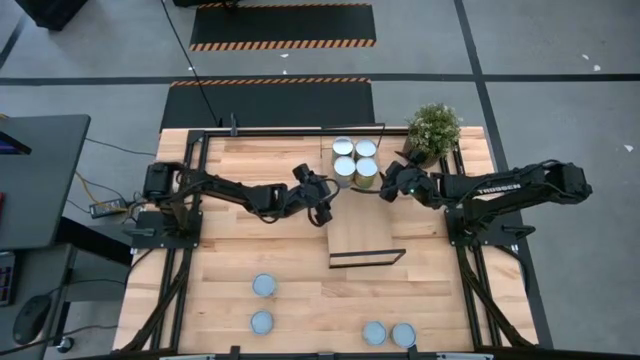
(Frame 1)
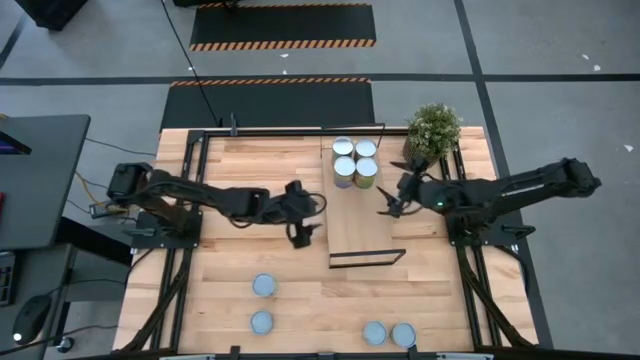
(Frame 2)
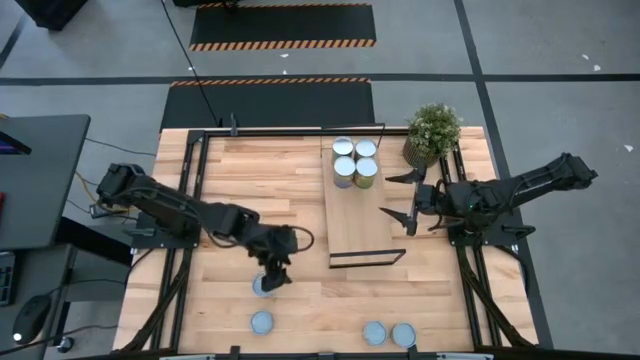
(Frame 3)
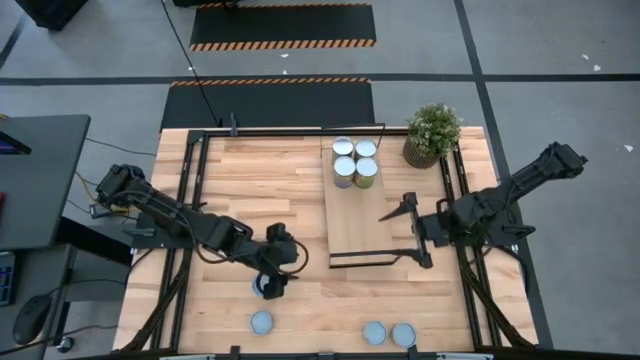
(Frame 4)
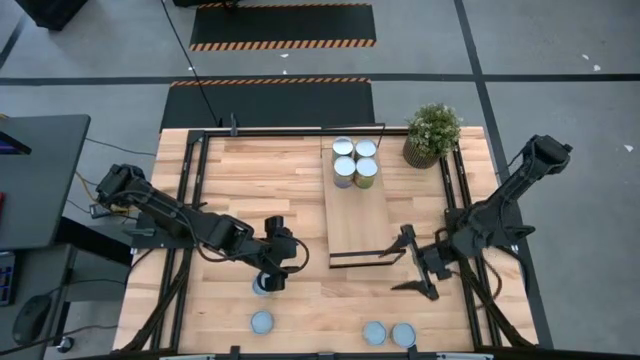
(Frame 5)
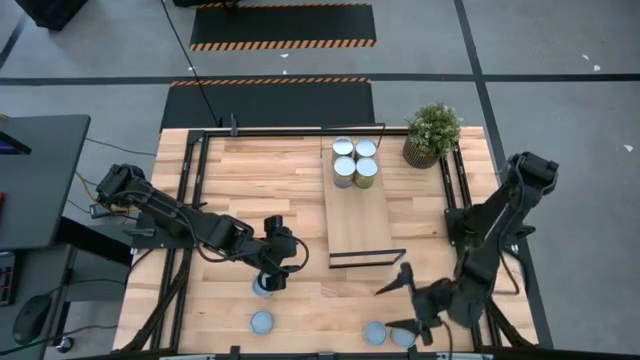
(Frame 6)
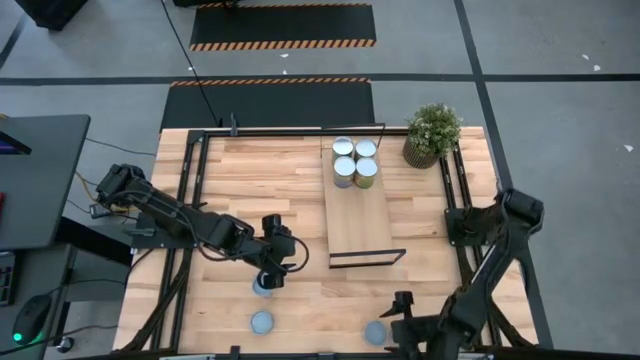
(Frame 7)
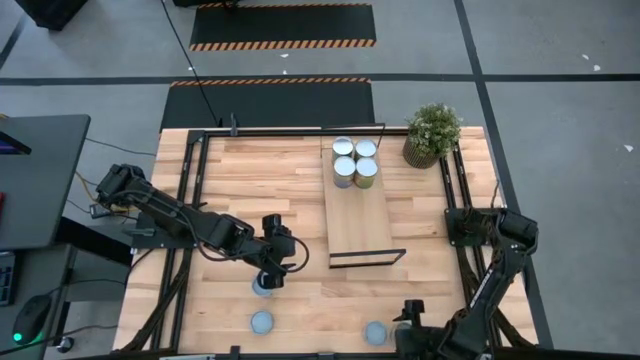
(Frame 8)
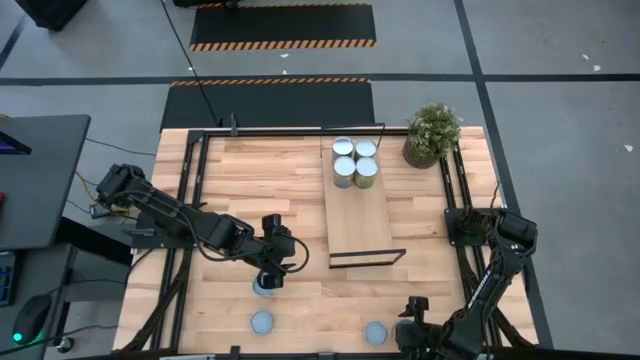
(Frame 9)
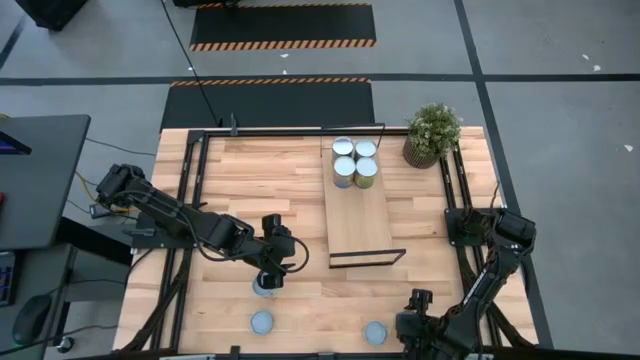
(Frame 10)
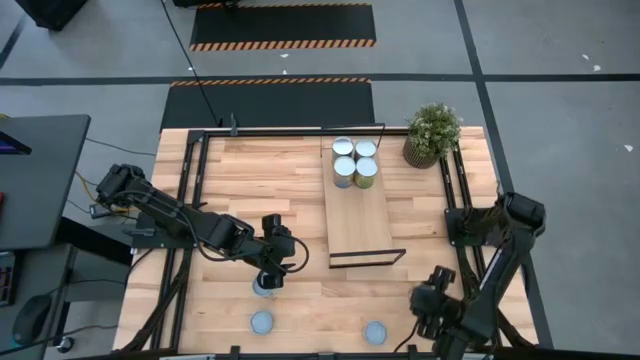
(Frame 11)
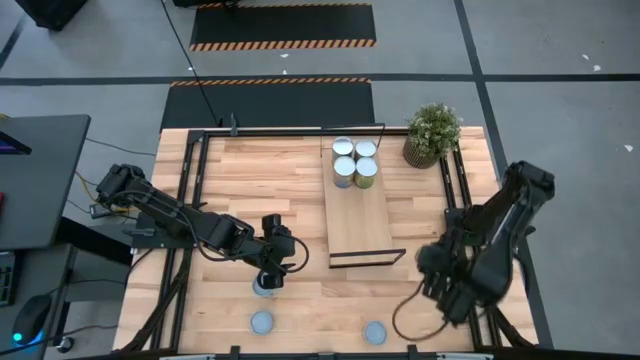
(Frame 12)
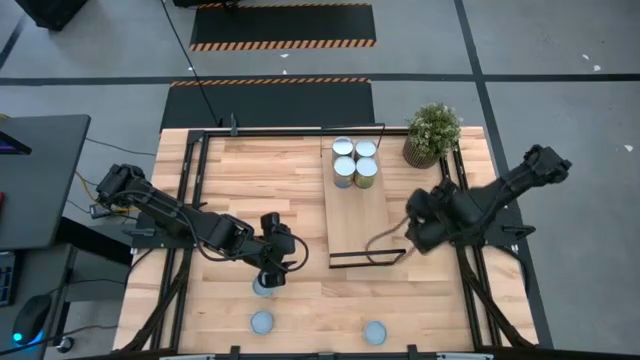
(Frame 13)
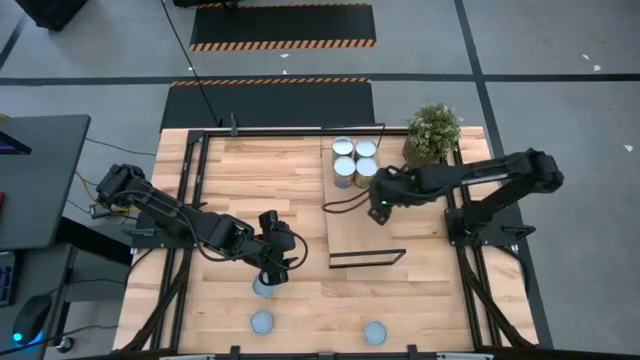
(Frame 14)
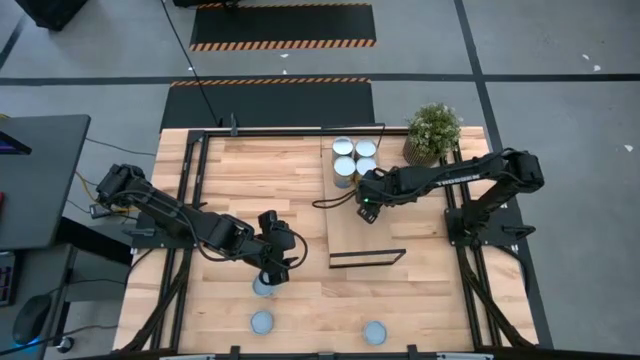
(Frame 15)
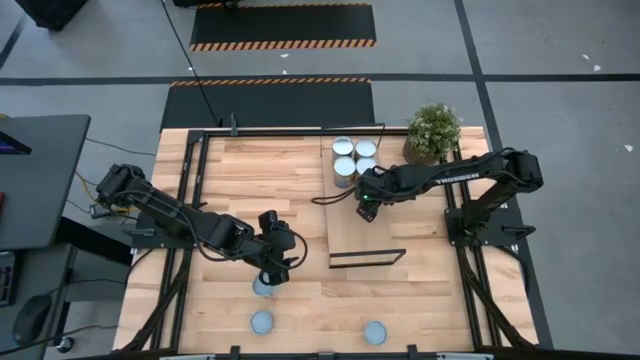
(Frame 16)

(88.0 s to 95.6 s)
Task: Pick and place cans onto a shelf
Put the canned green peas on the shelf

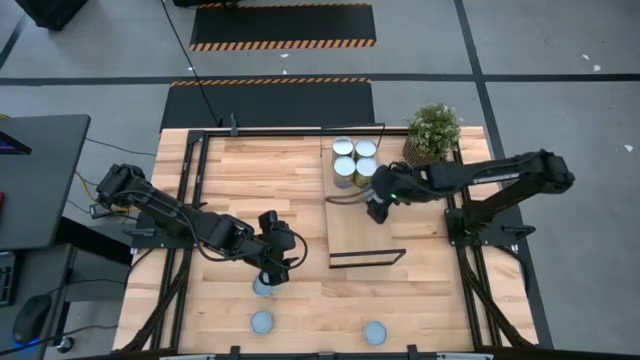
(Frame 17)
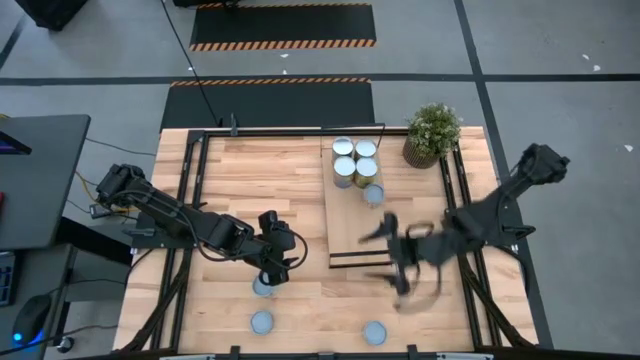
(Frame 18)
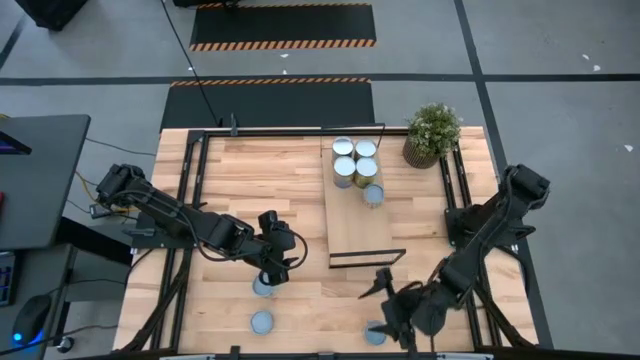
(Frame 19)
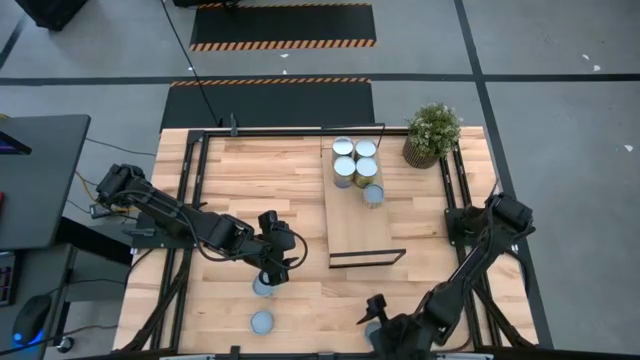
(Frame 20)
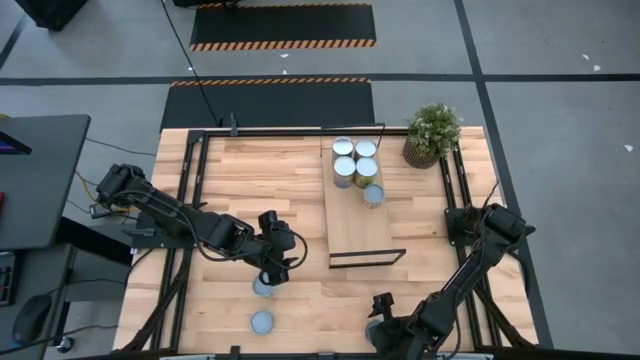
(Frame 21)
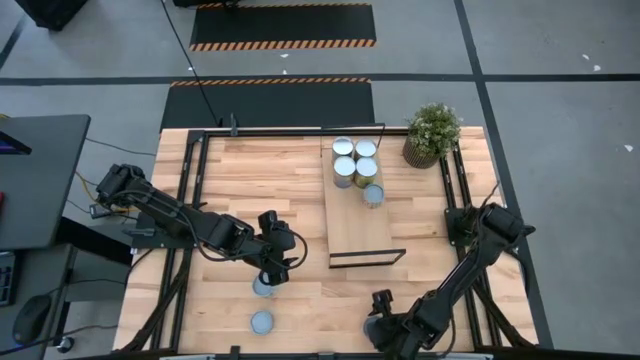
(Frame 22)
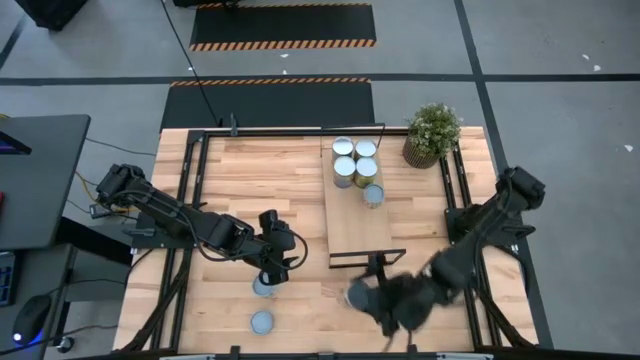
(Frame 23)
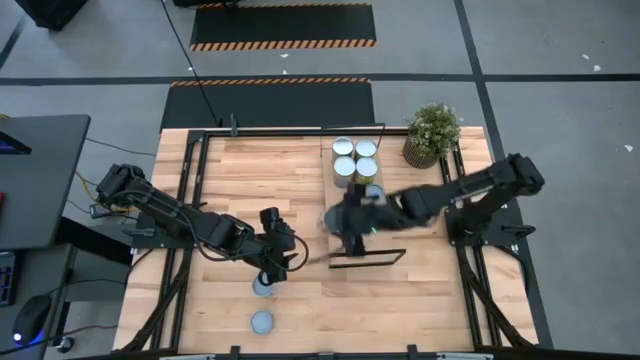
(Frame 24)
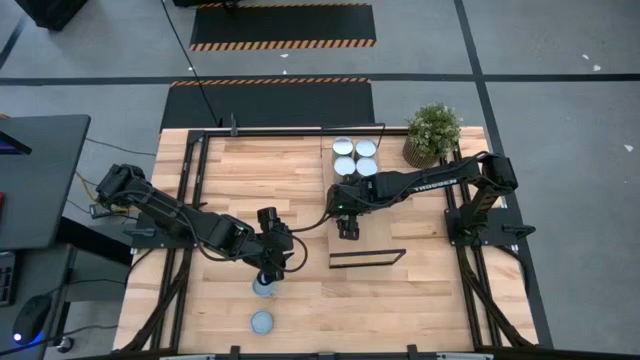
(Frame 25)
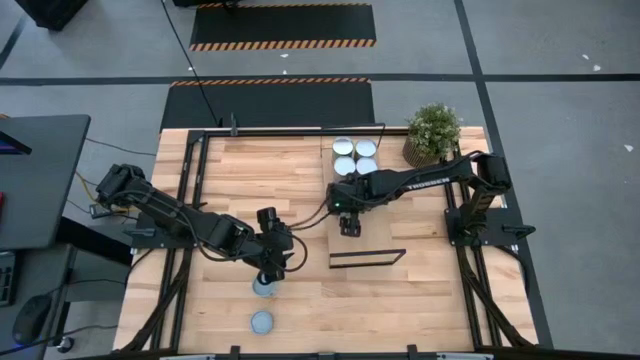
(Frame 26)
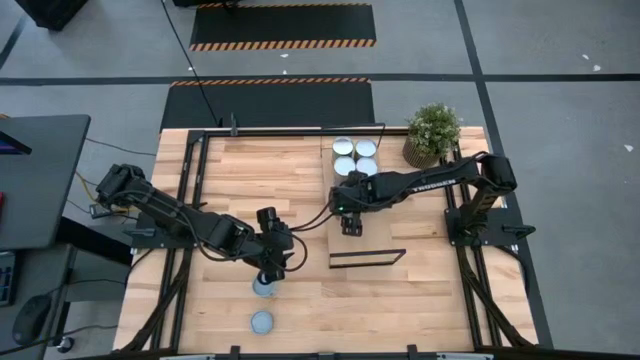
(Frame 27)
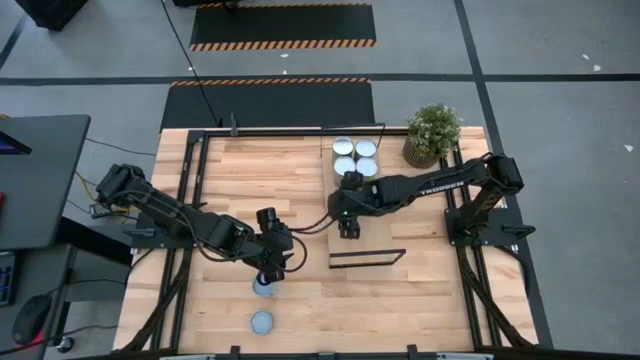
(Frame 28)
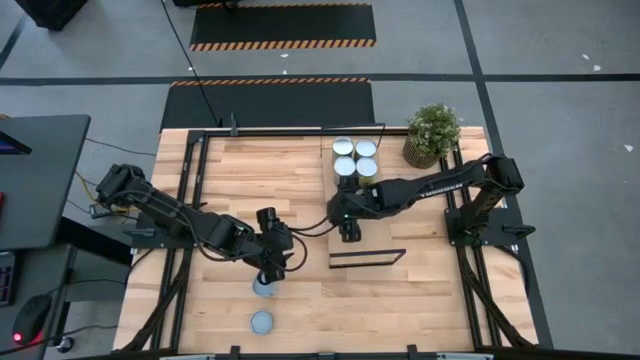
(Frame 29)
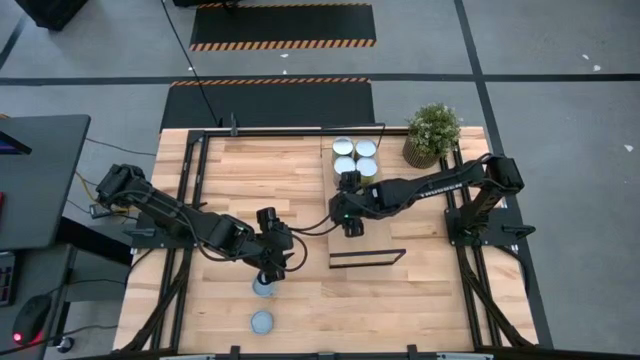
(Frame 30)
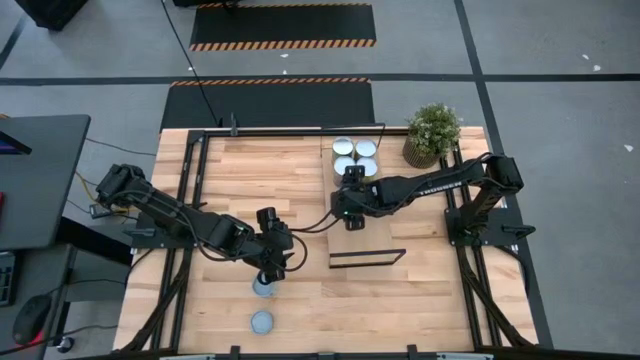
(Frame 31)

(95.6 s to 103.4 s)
Put the canned diced tomatoes on the shelf

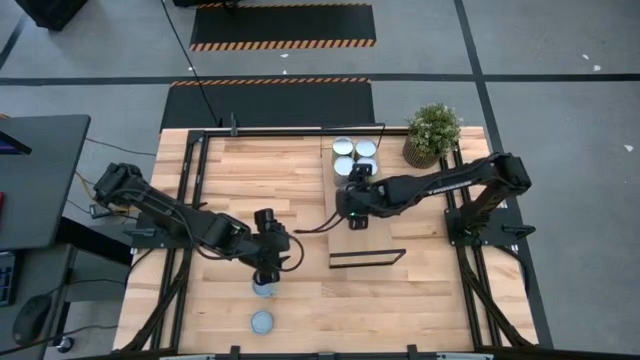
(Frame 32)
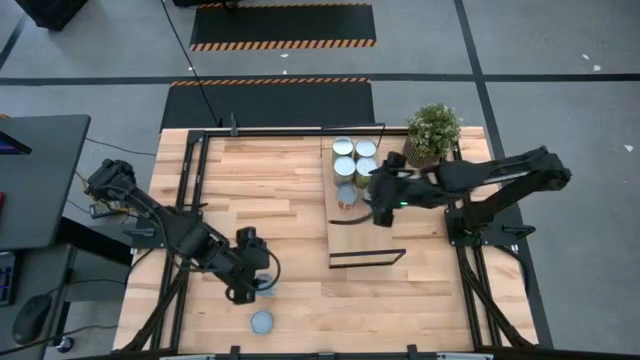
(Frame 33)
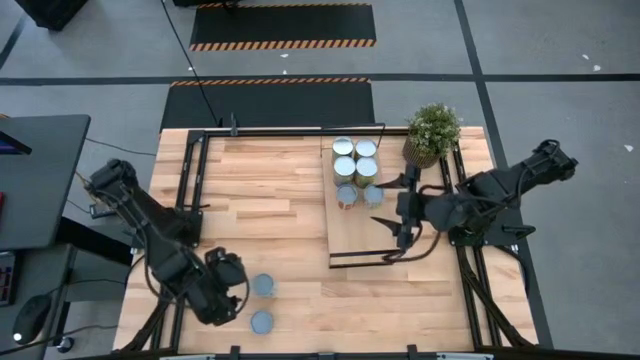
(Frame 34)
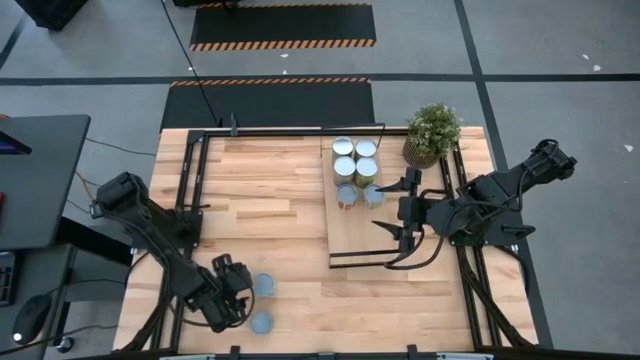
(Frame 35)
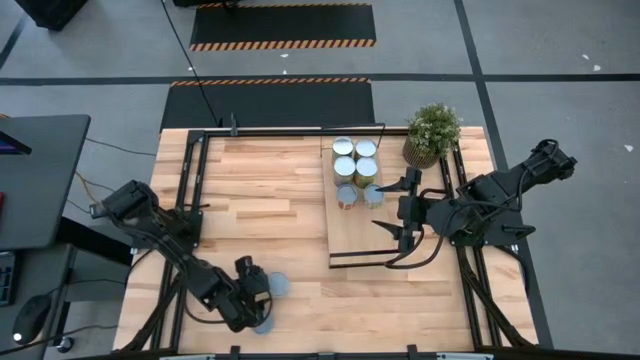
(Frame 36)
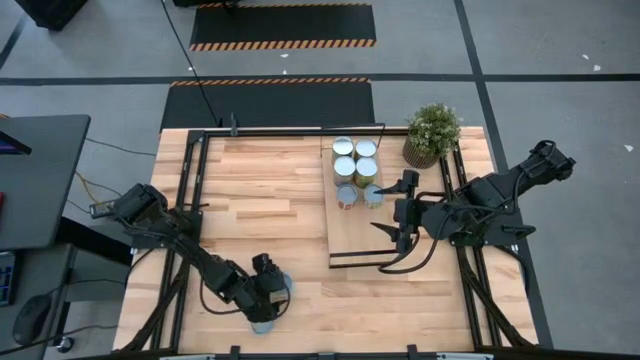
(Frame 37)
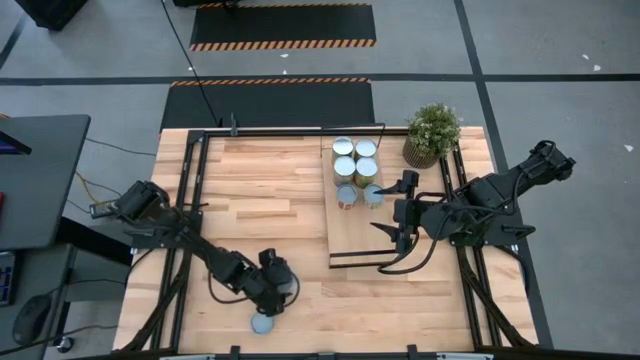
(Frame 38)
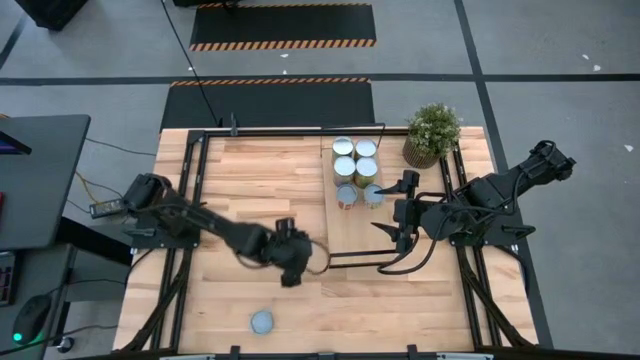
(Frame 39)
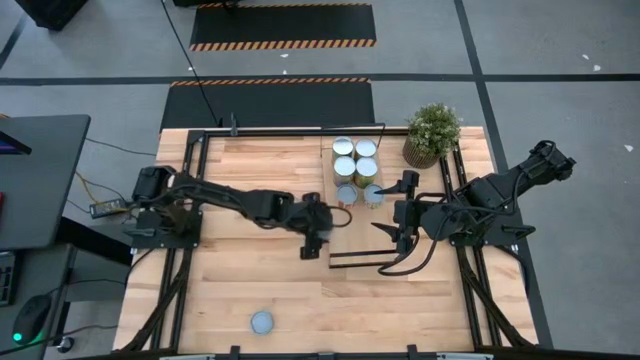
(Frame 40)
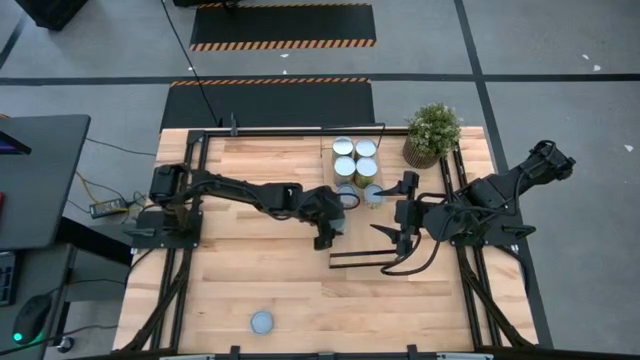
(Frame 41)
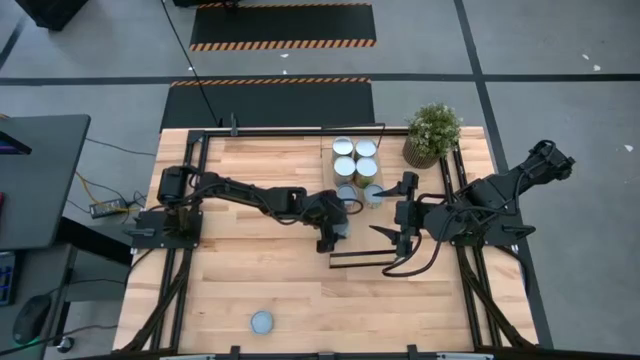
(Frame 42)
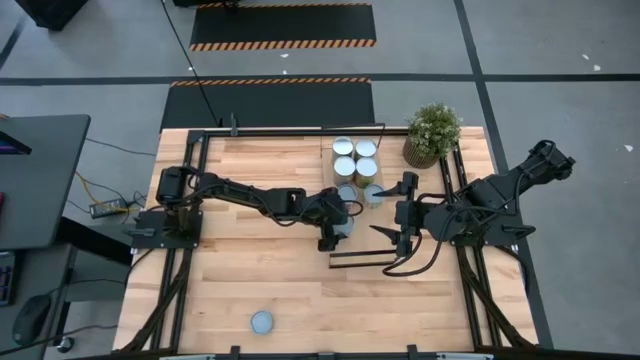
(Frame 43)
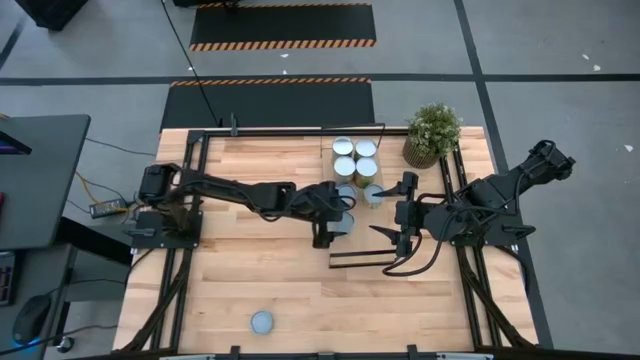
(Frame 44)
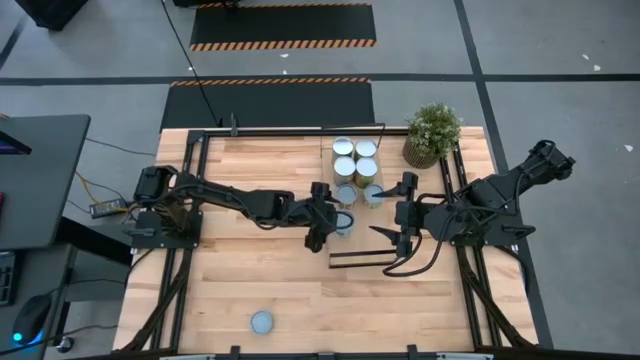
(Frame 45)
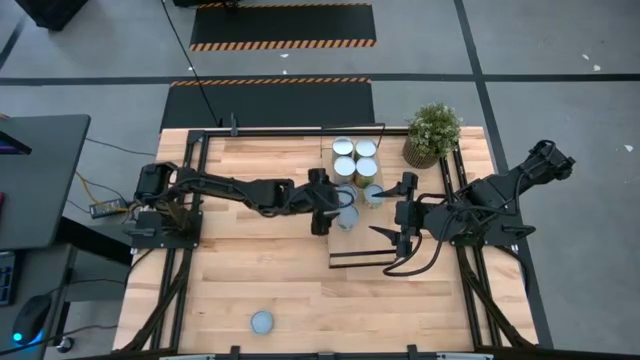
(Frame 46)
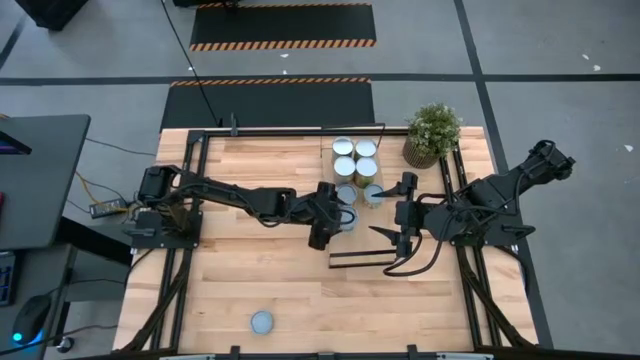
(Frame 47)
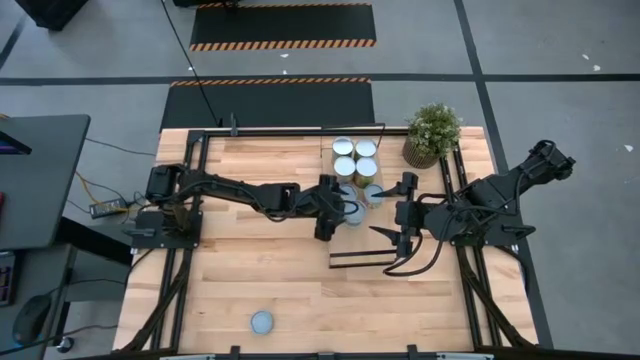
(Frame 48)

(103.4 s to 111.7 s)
Put the canned mixed vegetables on the shelf
